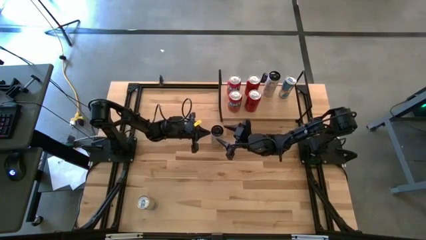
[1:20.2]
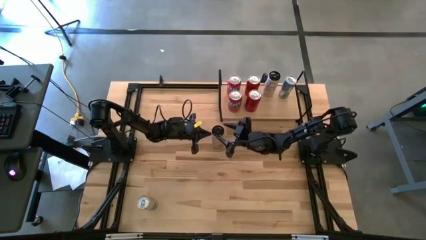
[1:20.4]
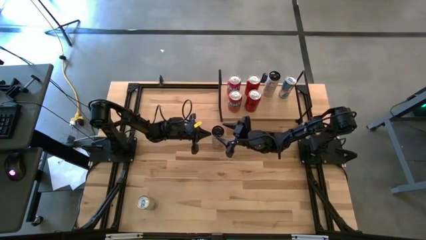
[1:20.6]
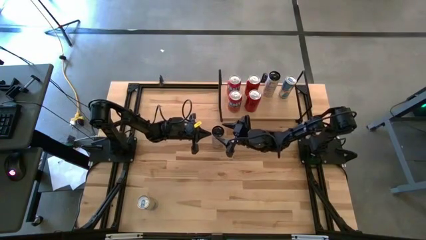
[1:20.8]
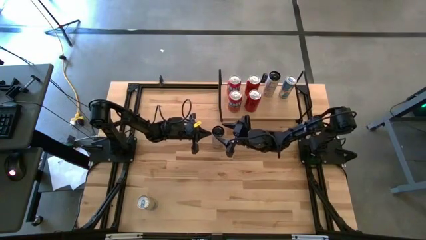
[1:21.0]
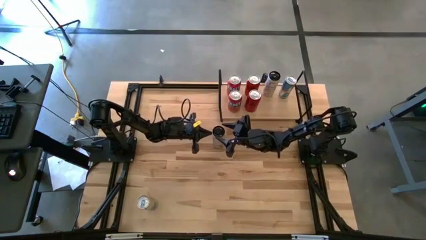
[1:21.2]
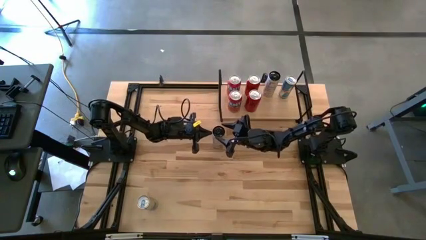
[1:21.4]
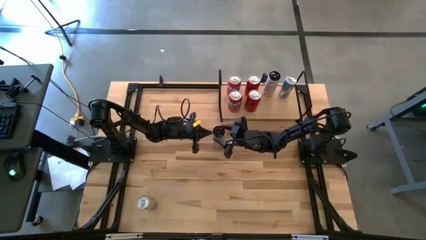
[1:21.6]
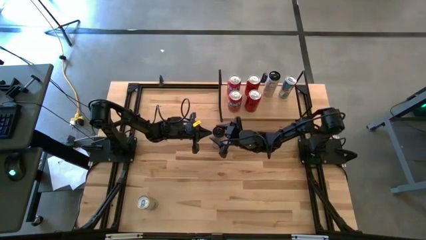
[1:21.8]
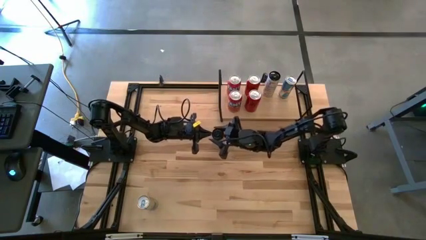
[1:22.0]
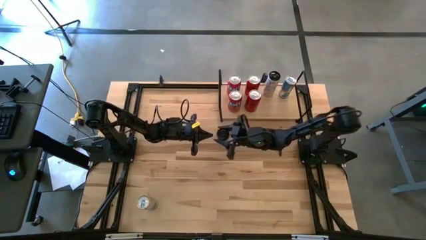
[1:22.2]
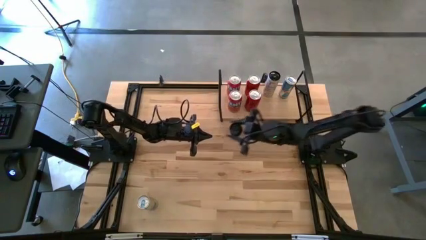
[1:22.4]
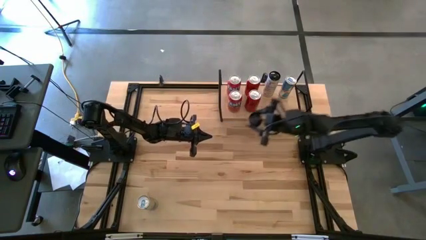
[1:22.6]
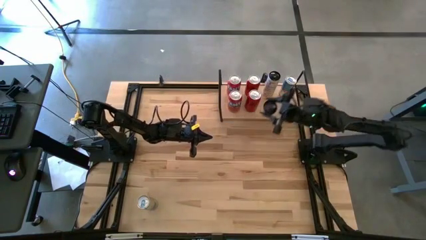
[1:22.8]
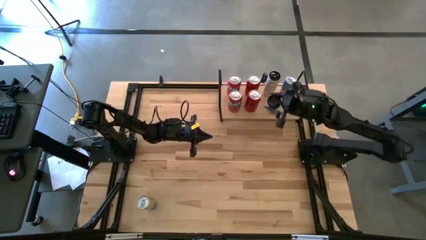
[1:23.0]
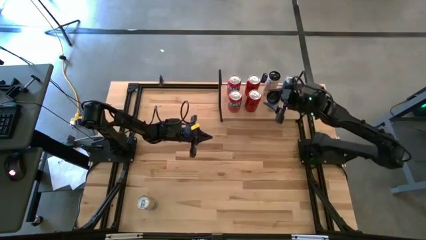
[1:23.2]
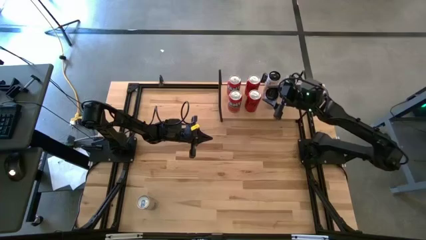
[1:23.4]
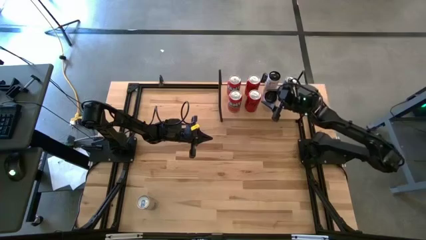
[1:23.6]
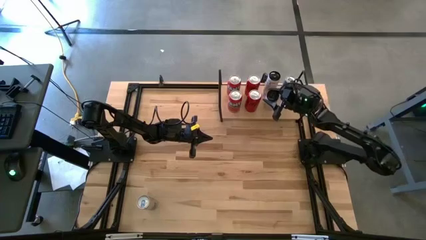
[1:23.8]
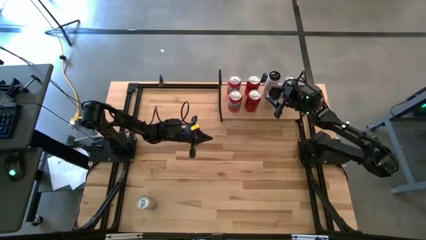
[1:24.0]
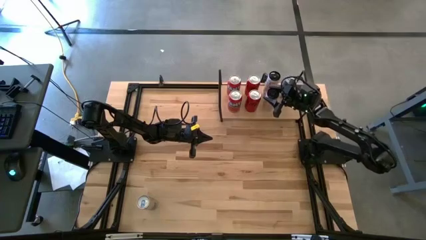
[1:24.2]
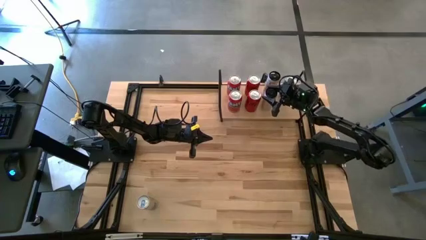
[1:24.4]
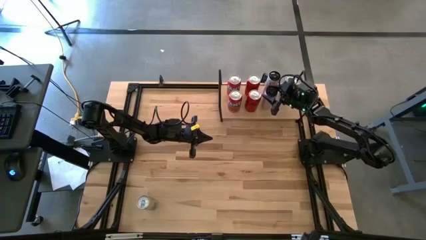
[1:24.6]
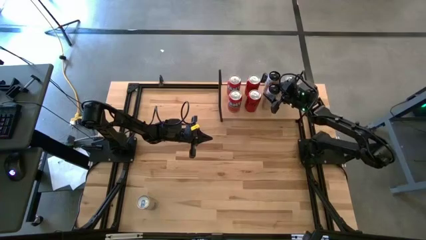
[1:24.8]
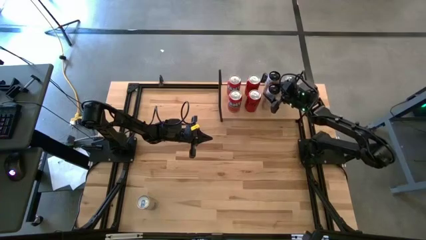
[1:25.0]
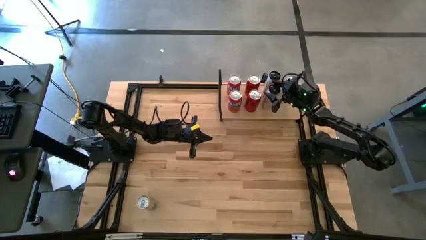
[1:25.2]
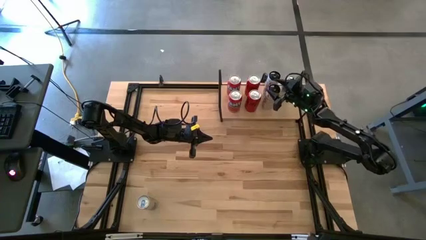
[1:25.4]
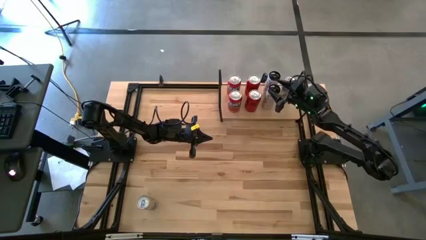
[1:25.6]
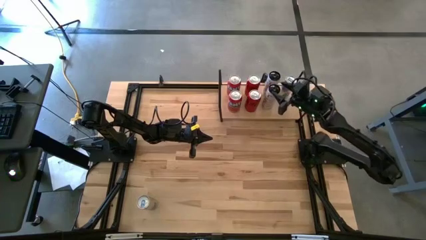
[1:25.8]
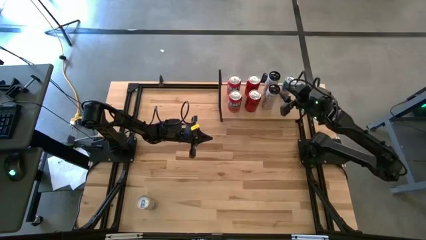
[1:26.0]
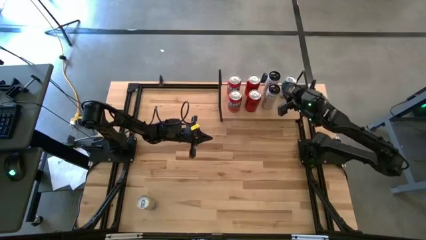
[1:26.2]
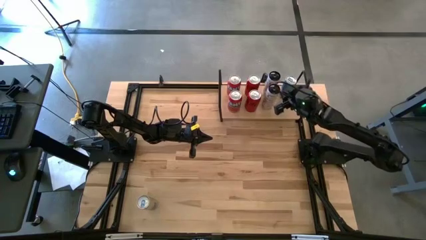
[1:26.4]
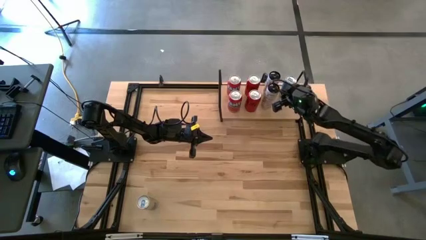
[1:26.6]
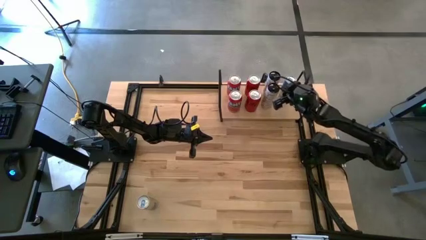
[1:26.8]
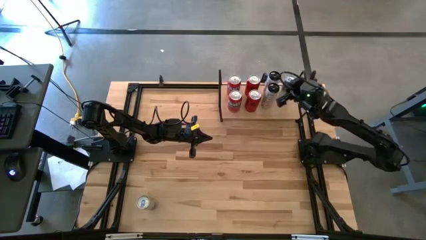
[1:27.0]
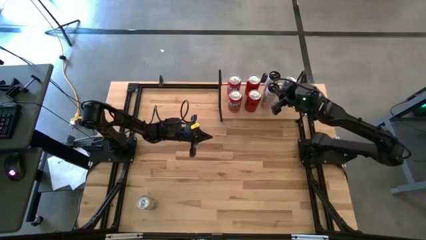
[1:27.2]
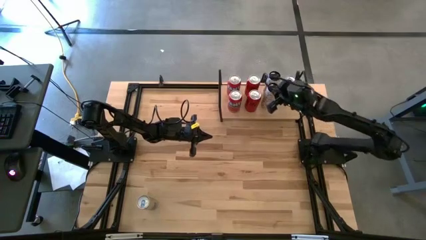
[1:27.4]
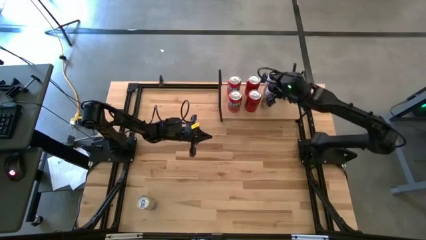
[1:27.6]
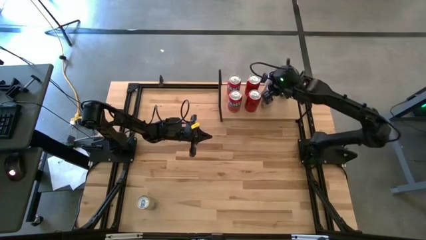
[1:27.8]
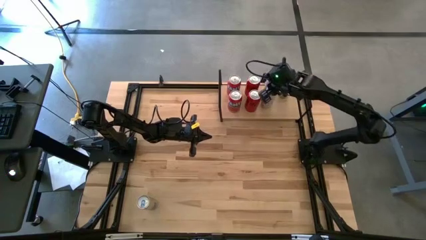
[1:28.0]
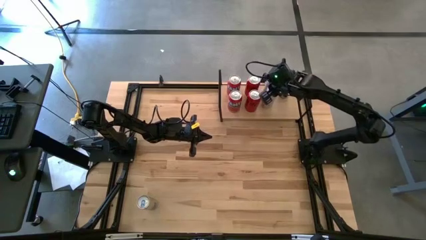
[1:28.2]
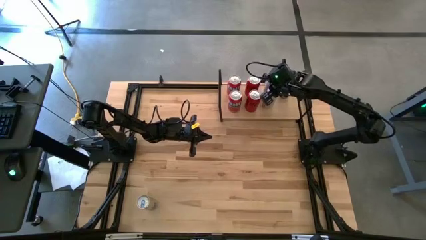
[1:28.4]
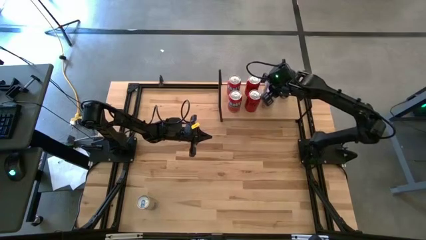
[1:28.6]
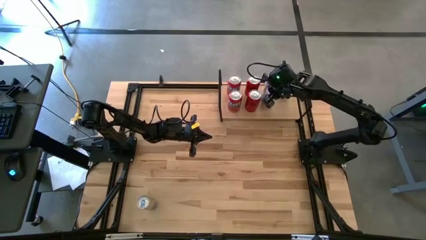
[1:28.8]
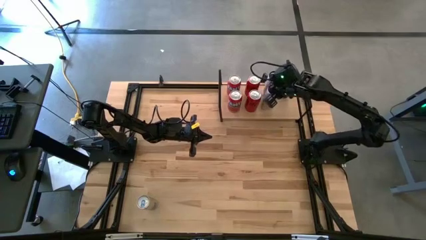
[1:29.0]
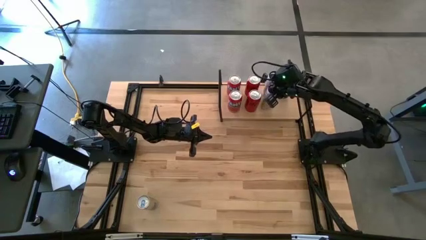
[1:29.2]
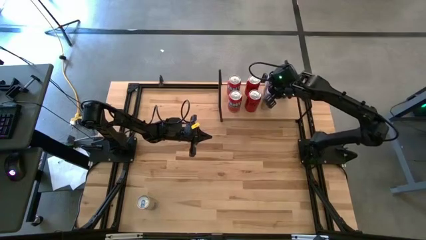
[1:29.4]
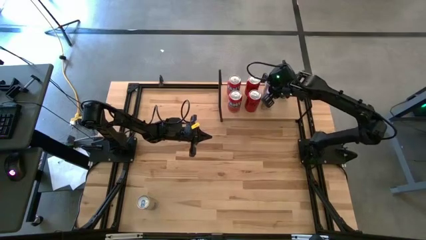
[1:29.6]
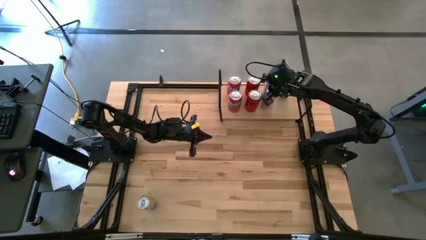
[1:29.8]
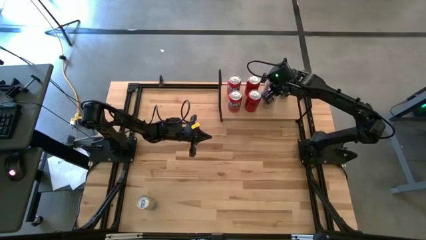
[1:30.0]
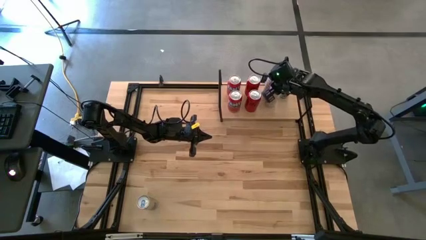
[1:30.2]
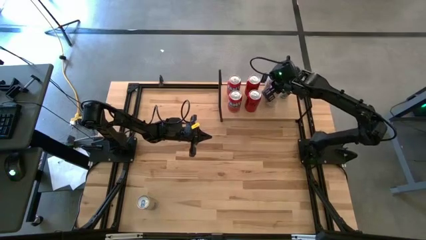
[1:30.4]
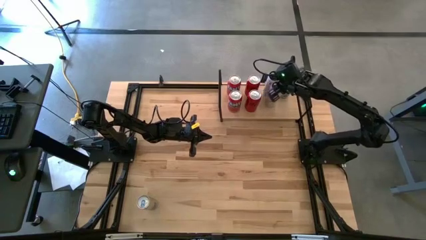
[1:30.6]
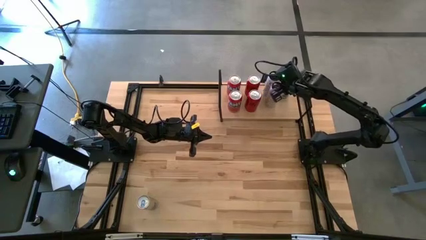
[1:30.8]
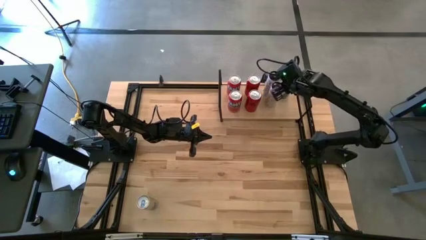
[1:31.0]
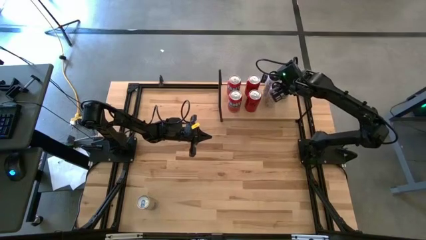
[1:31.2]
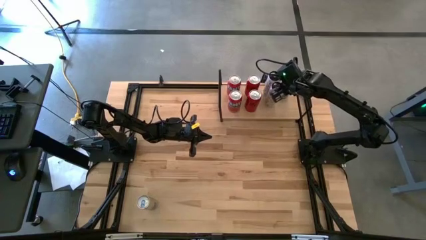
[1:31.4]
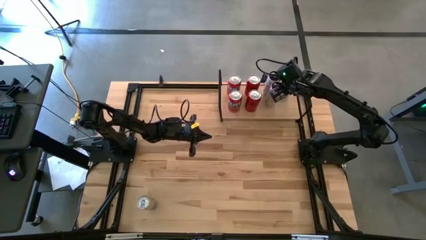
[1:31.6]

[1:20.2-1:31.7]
Task: Place canned beverage on shelf
Put the white yellow soda can on the shelf aligned with the white yellow soda can

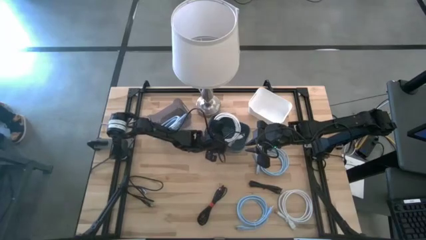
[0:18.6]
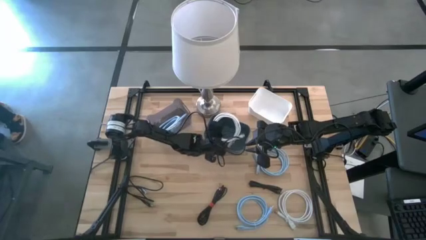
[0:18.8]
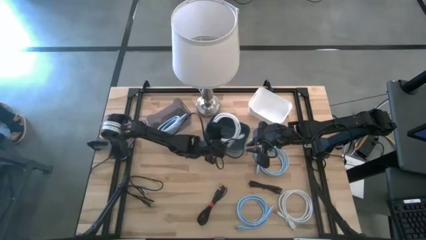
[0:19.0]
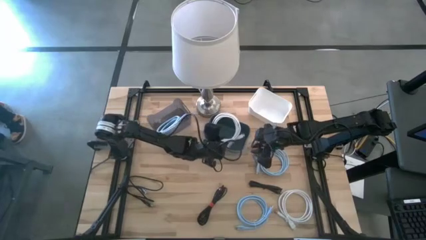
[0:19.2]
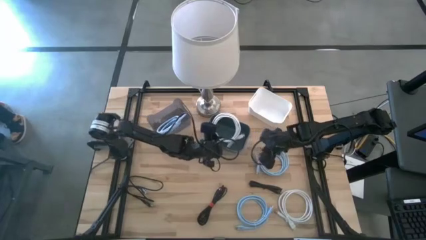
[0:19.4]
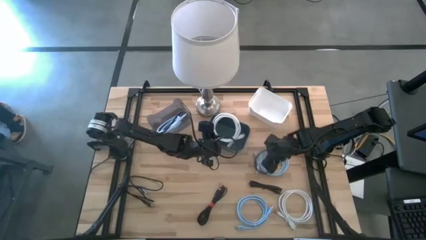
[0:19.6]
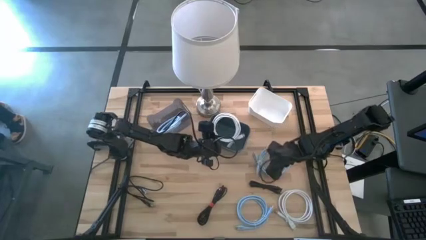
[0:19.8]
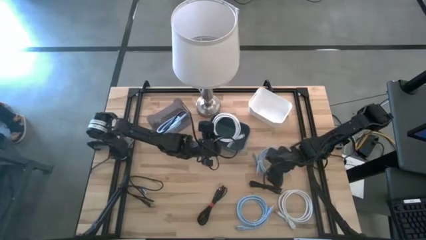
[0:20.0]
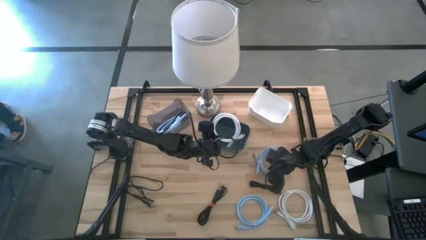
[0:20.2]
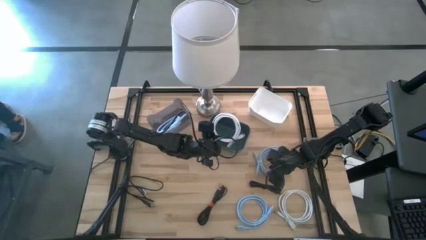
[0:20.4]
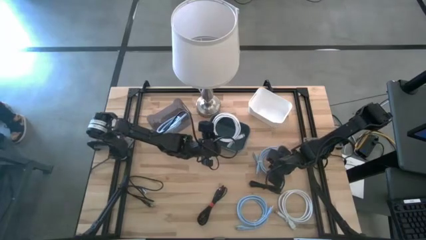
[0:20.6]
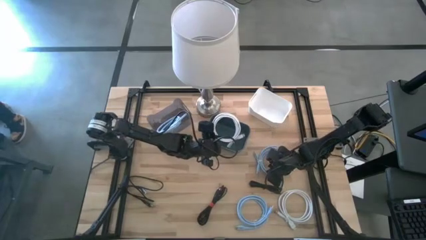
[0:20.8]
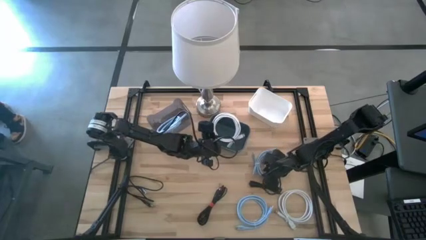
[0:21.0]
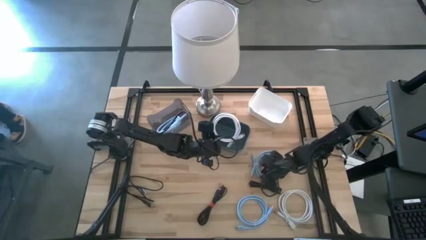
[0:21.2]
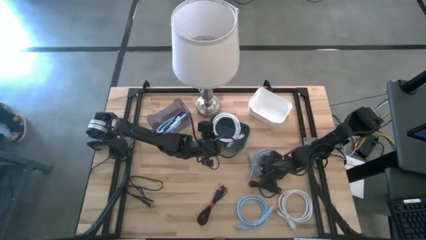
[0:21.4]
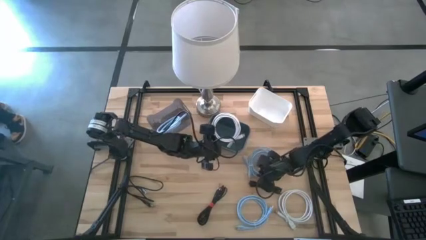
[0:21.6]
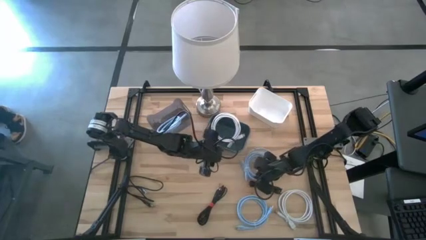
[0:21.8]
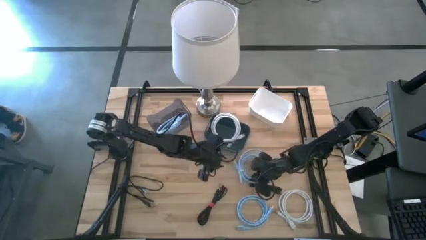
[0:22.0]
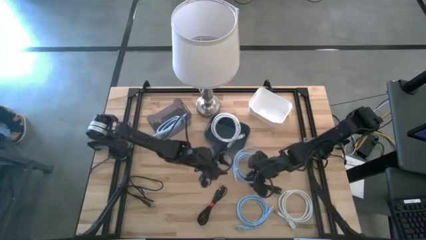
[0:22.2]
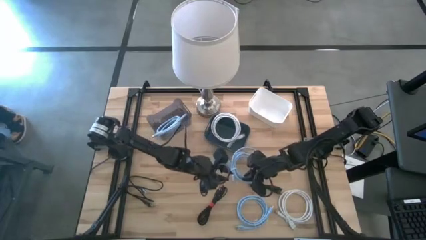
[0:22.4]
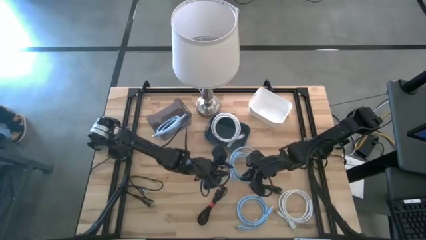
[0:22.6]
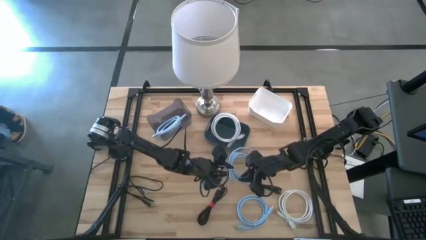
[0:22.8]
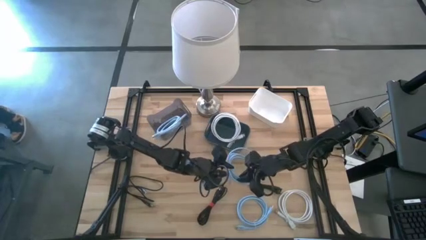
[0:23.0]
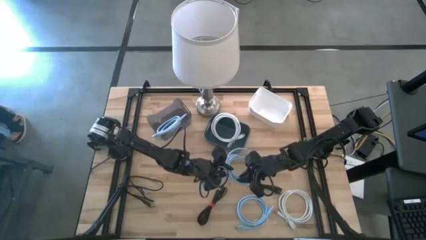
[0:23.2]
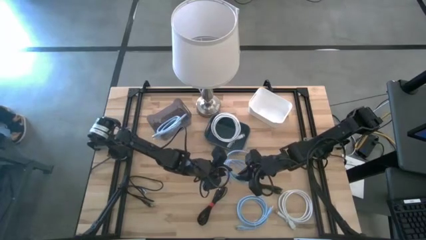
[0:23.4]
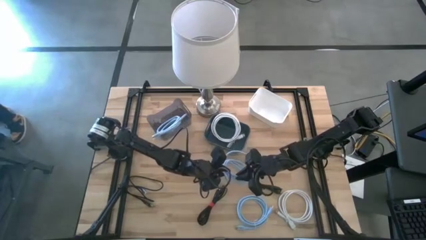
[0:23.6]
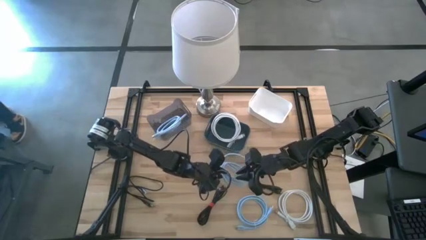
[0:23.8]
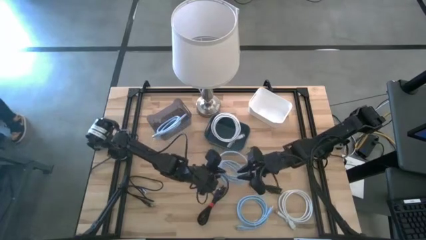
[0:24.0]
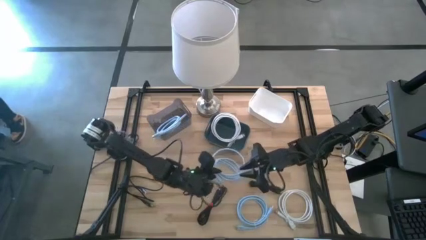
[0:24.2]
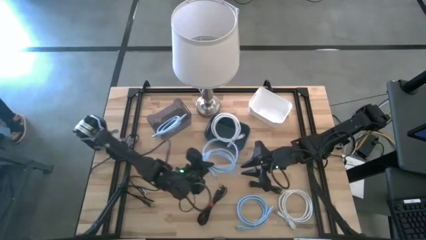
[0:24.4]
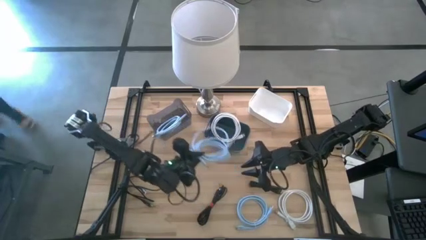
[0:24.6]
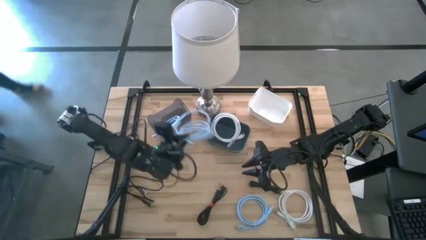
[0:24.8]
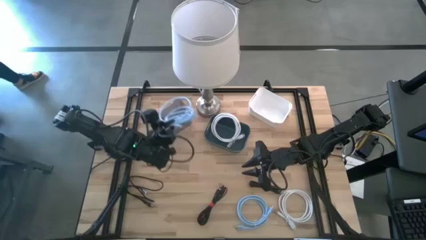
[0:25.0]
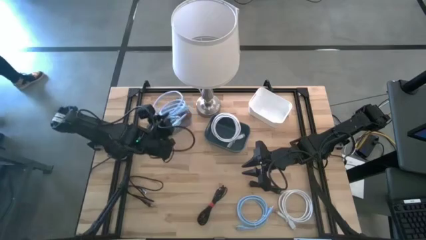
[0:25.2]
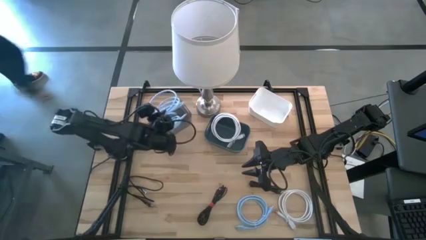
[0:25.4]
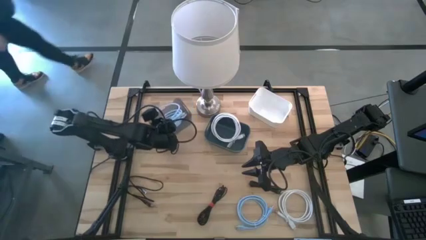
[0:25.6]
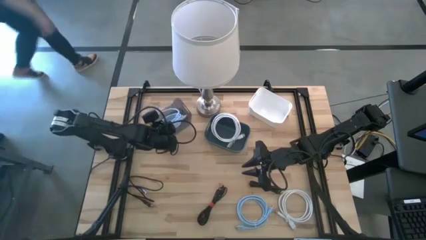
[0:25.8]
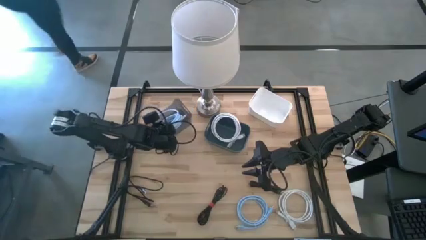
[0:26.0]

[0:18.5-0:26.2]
Task: Pick & Place USB Port
Put the top blue hdmi cable into the black bin
